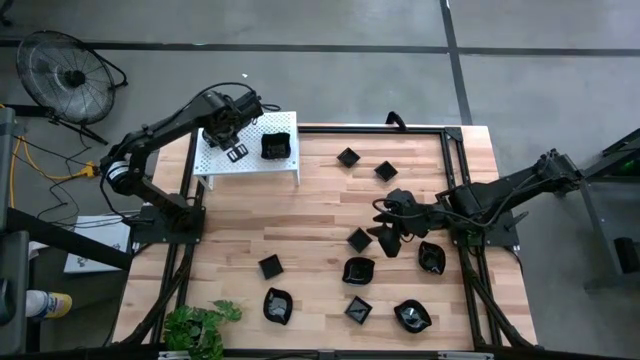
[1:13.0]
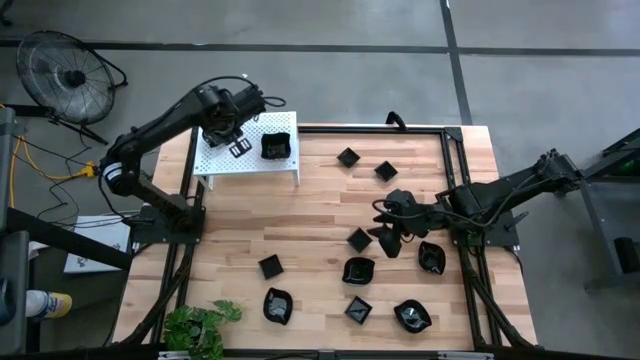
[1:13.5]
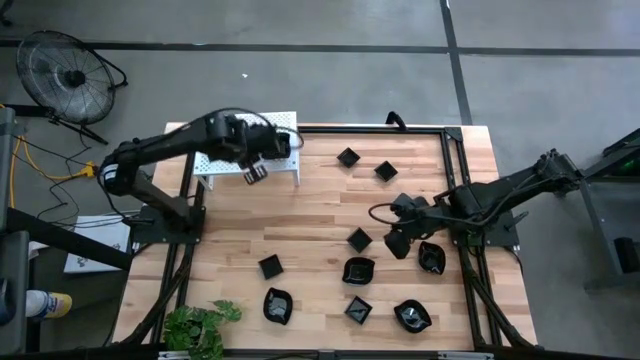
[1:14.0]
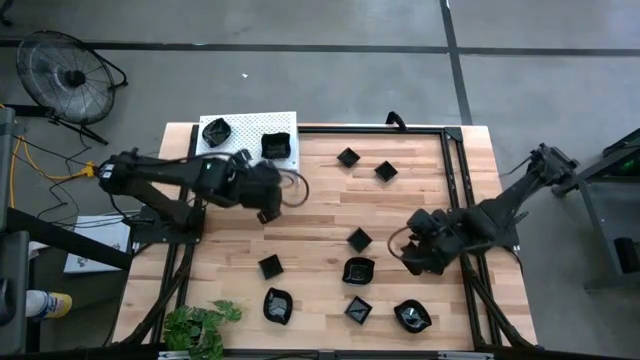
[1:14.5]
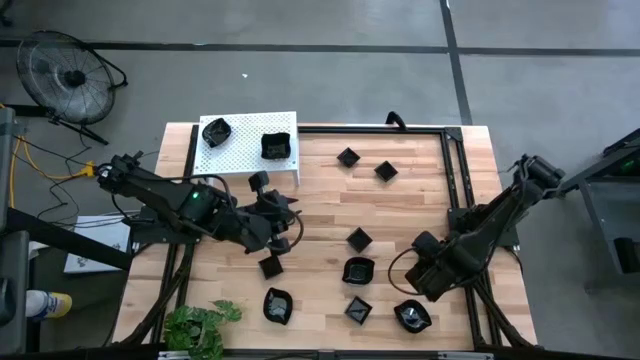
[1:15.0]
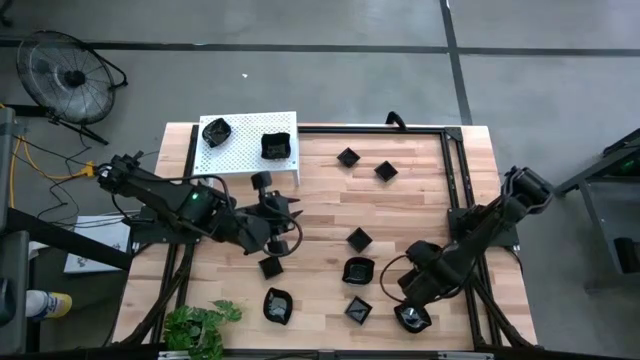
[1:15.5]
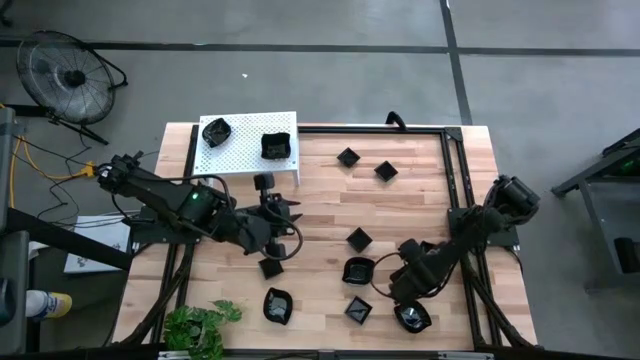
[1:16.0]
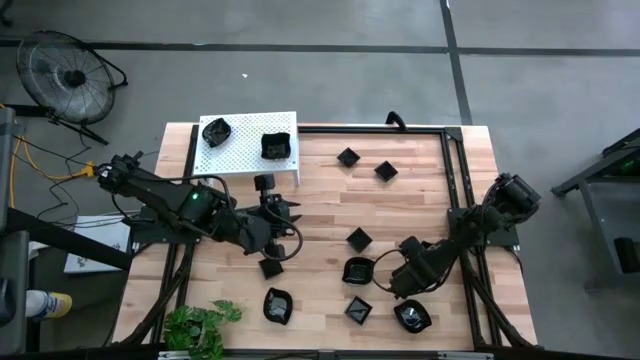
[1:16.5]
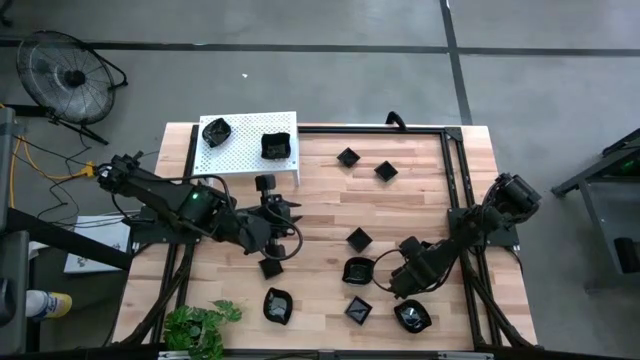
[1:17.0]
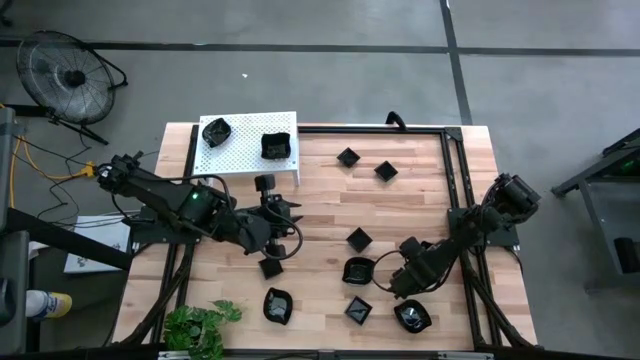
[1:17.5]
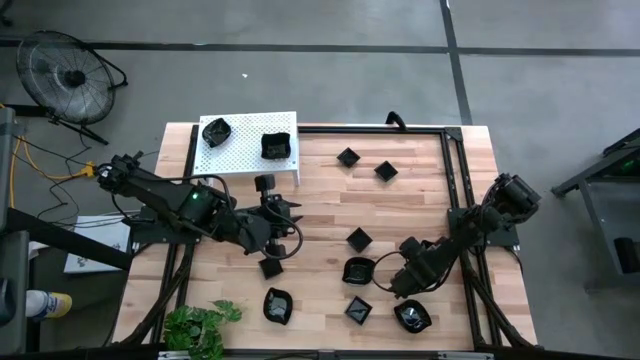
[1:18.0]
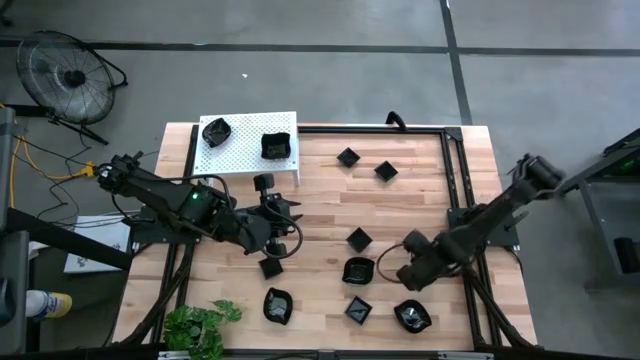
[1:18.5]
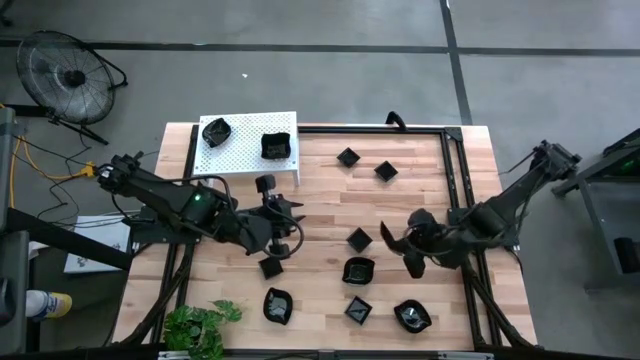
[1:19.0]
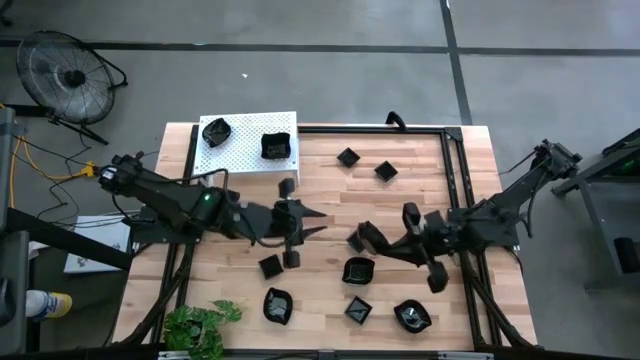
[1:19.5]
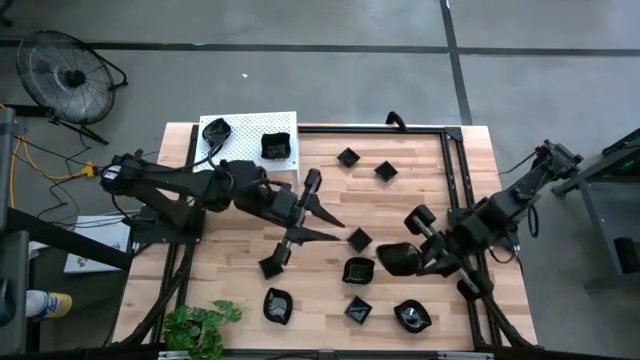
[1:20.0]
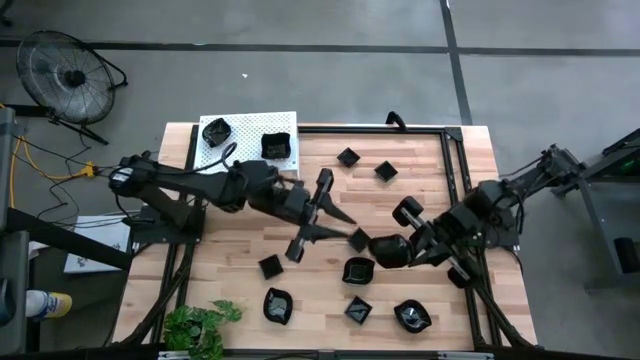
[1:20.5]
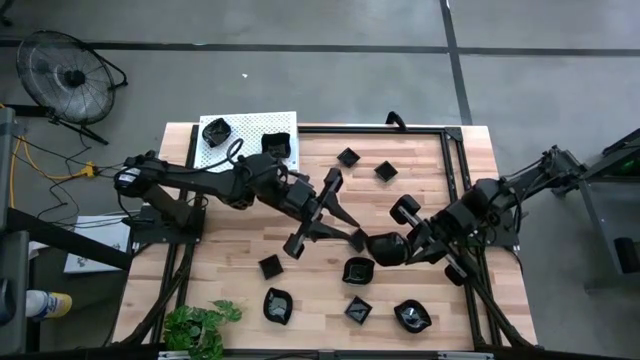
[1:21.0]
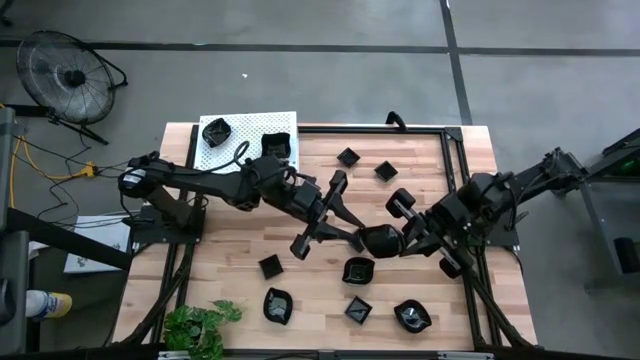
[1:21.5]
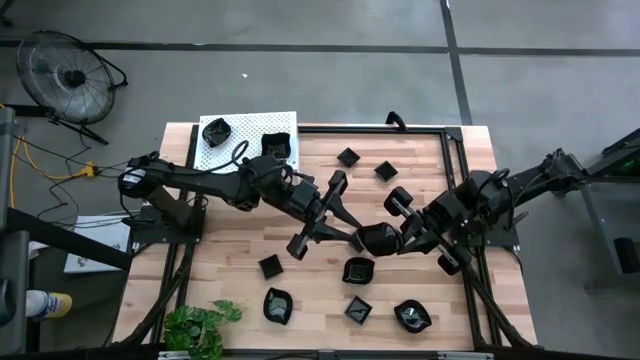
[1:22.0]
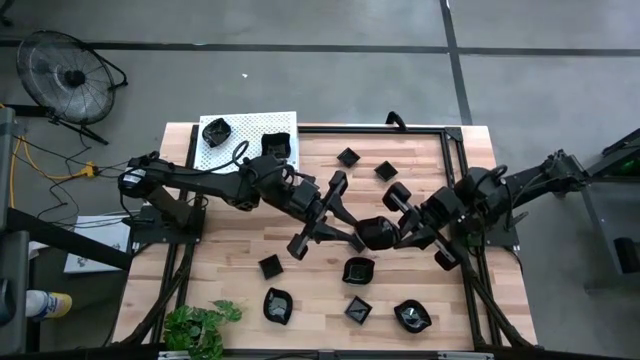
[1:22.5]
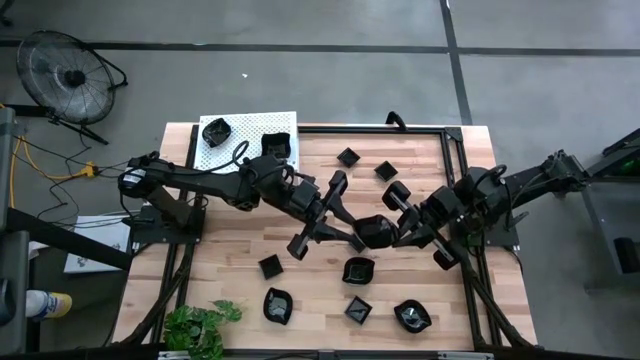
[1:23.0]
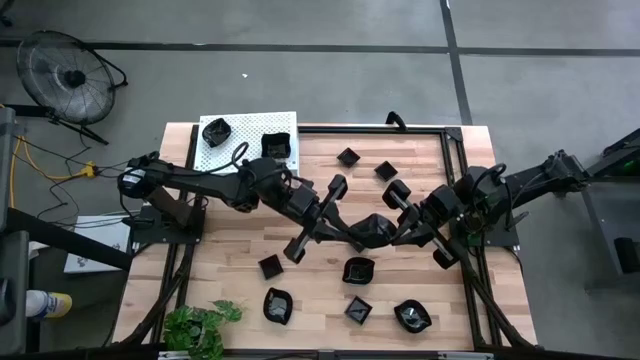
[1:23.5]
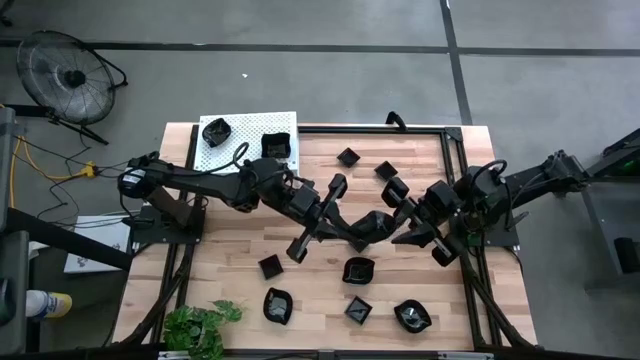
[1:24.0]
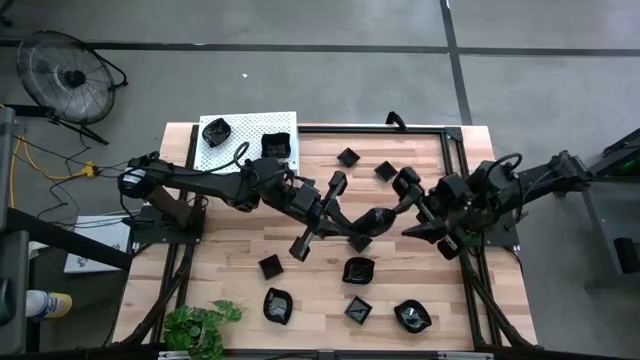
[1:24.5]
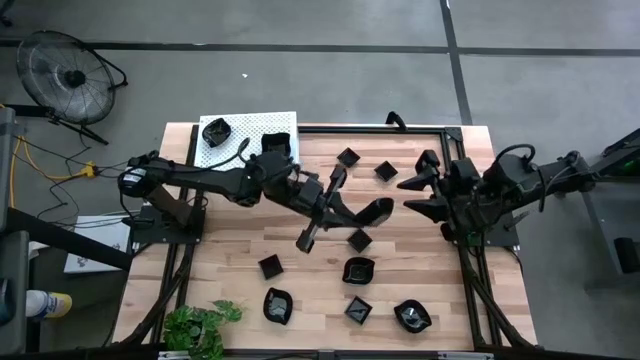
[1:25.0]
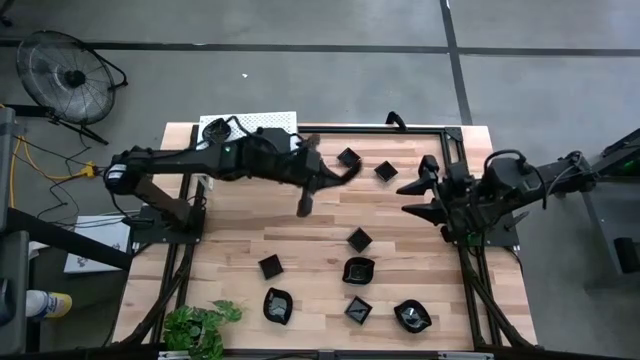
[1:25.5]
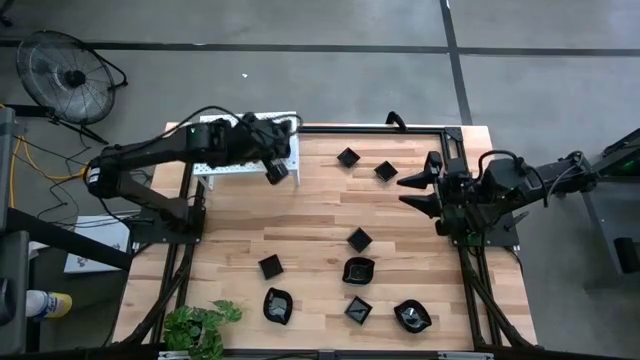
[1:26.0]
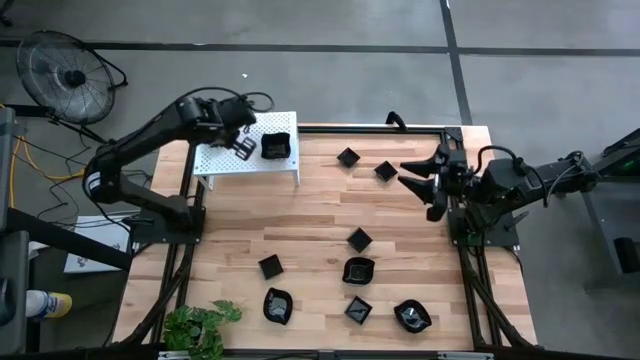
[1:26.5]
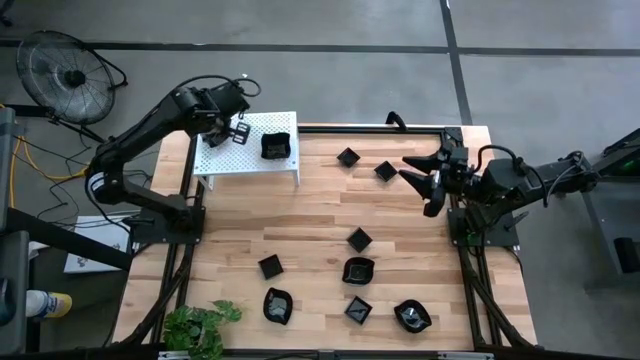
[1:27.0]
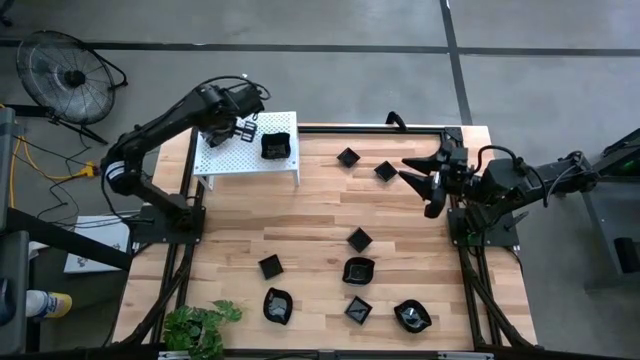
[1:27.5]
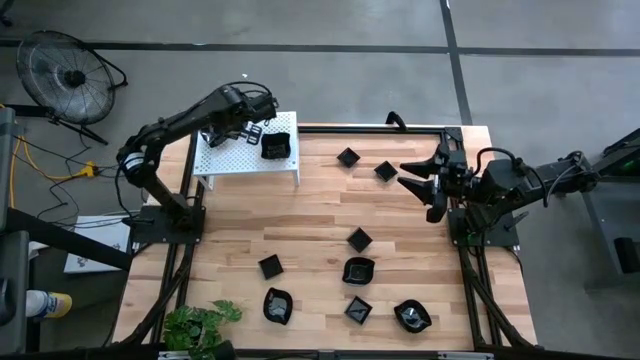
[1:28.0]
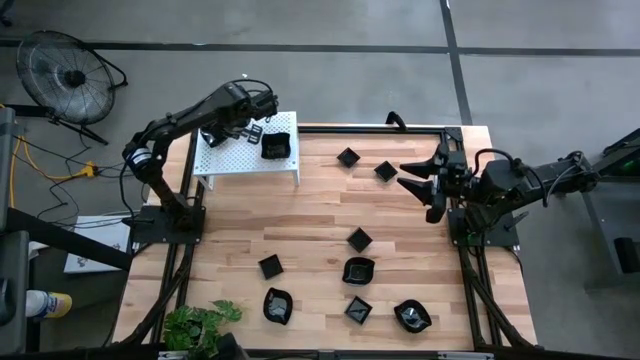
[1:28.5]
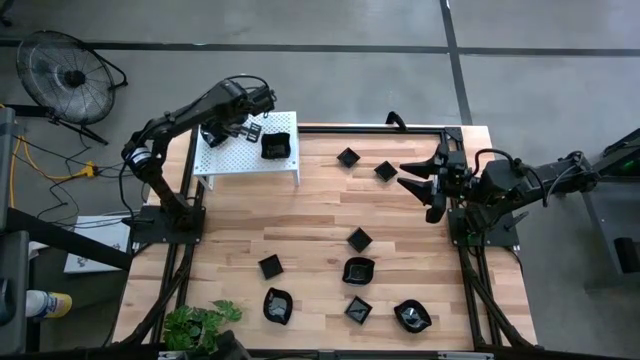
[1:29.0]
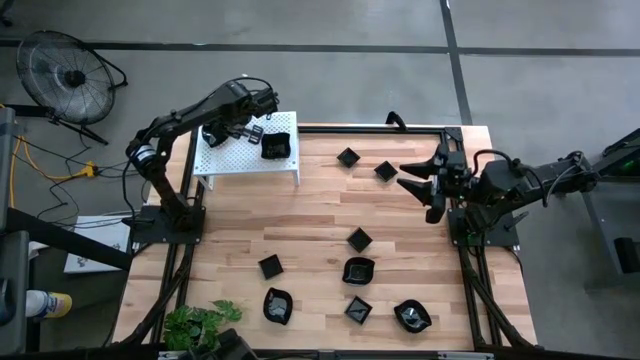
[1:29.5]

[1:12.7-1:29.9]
Task: Pick & Place Mini shaped plates
Stack the black leaf-shaped plate on the black leaf-shaped plate on the shelf

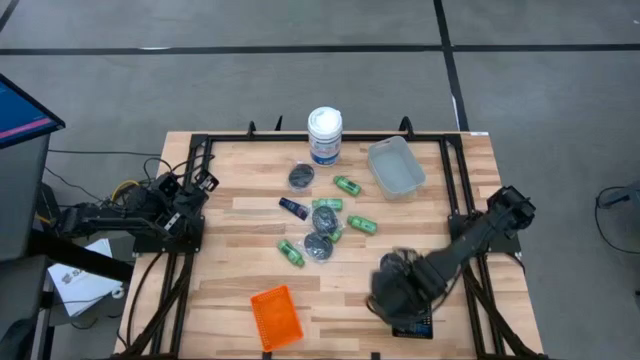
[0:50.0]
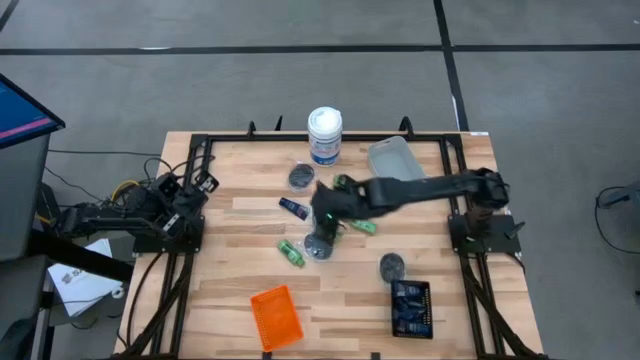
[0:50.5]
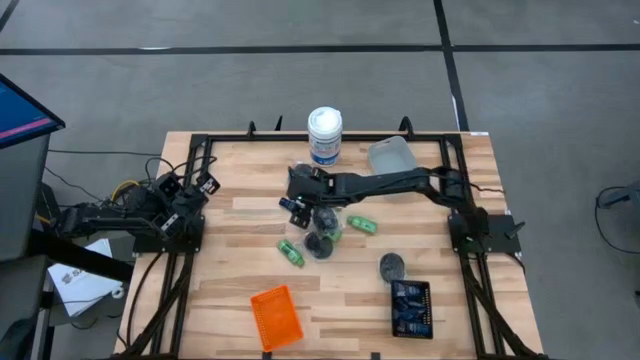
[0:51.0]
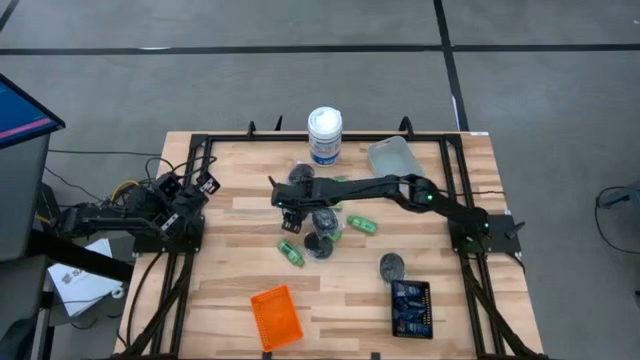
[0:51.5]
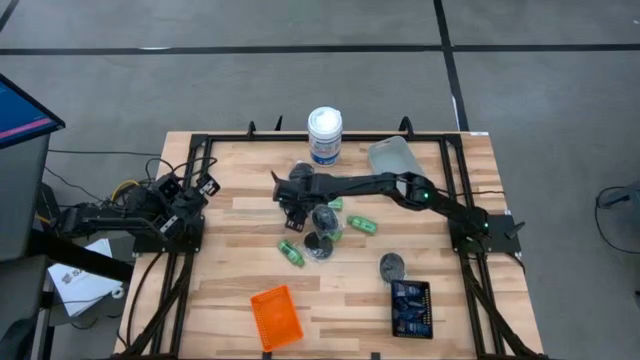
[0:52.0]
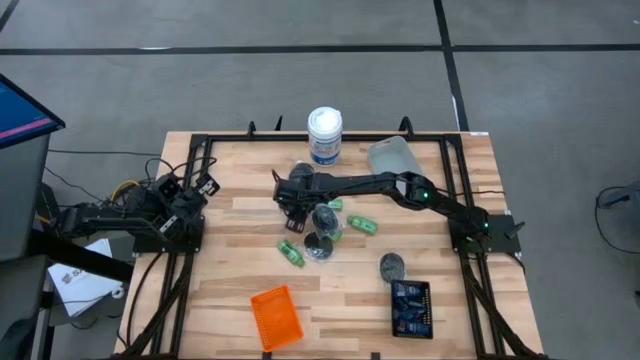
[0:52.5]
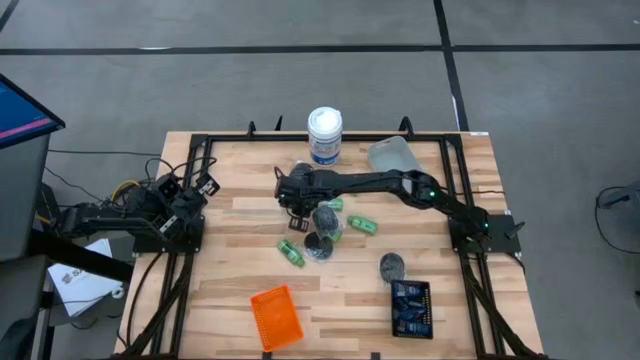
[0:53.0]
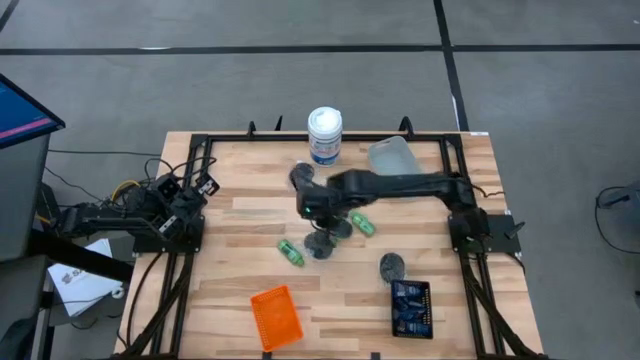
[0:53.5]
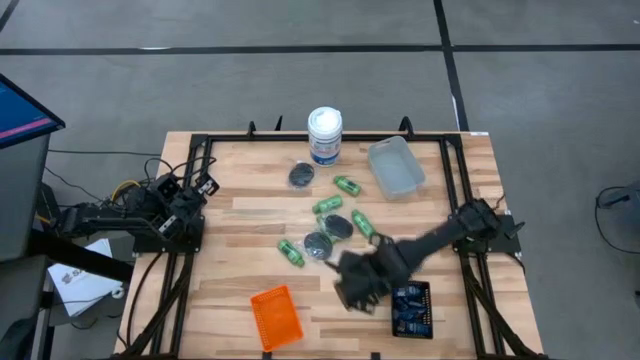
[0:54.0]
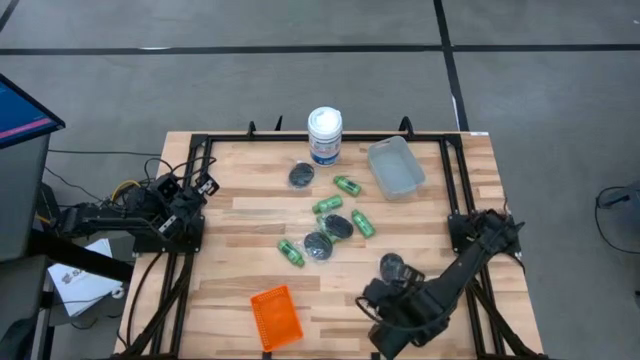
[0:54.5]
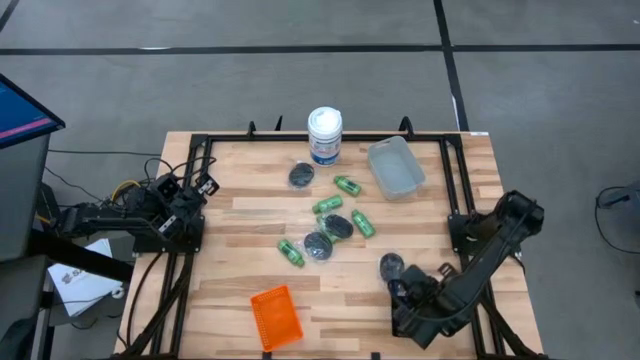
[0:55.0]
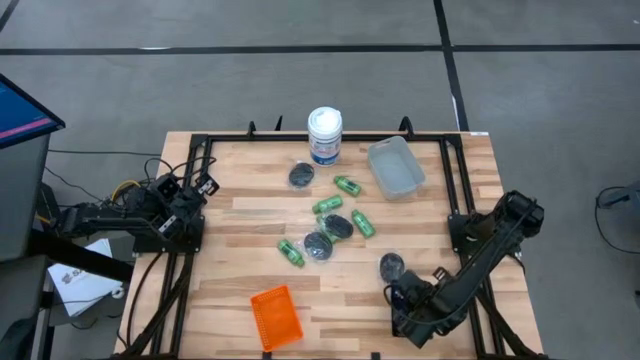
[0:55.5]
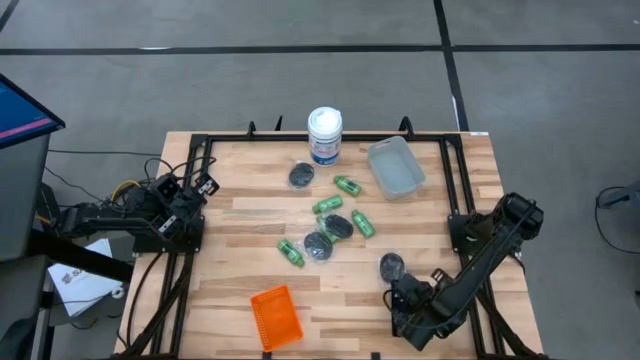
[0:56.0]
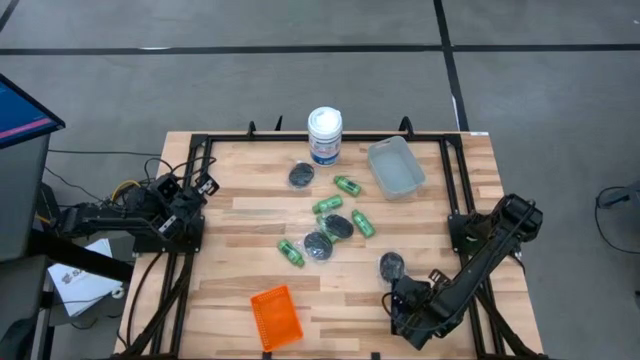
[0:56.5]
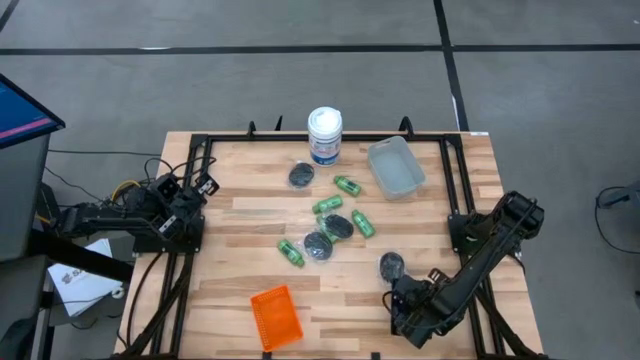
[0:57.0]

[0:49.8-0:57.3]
Task: Pick & Place Travel size toiletries
Put the blue shave cream into the black basket
